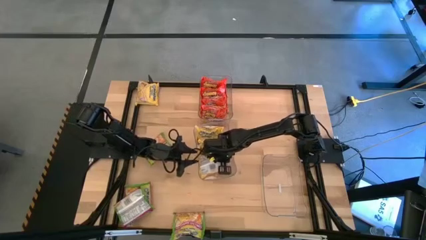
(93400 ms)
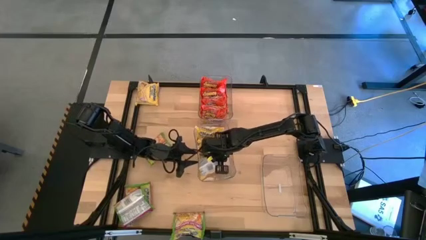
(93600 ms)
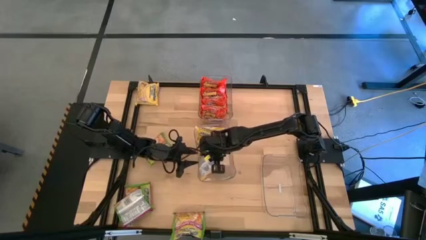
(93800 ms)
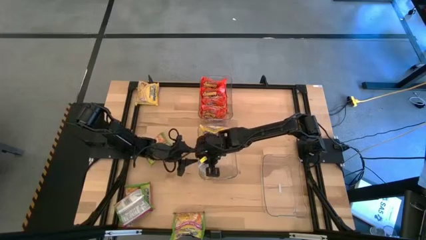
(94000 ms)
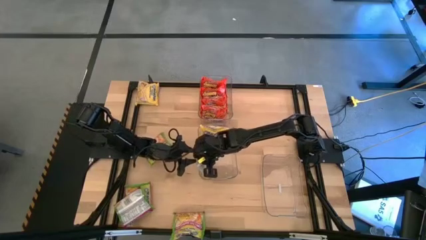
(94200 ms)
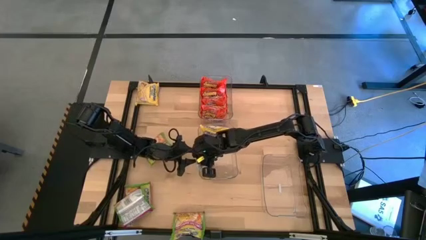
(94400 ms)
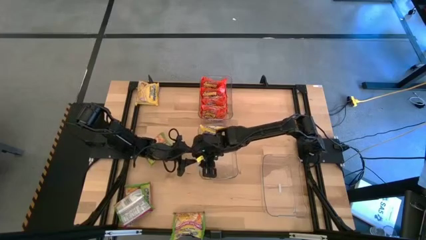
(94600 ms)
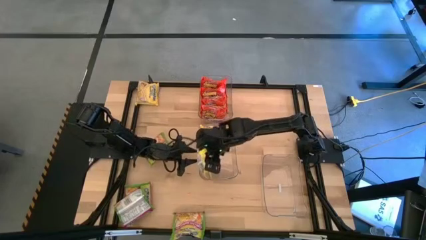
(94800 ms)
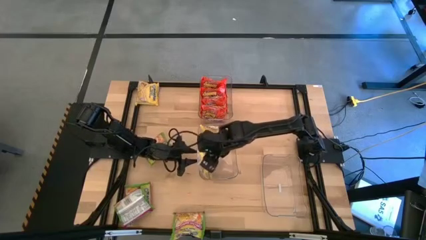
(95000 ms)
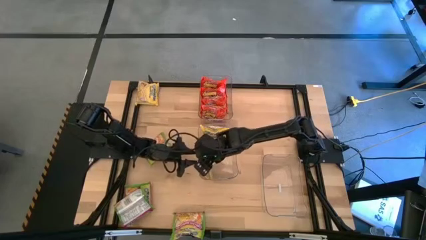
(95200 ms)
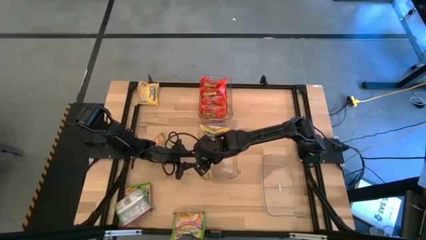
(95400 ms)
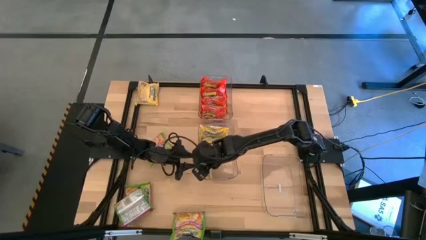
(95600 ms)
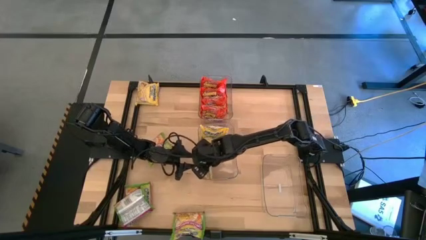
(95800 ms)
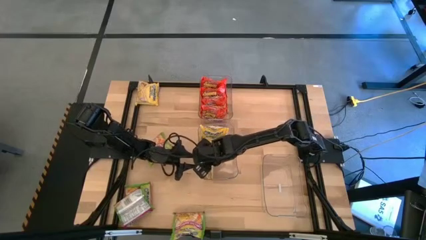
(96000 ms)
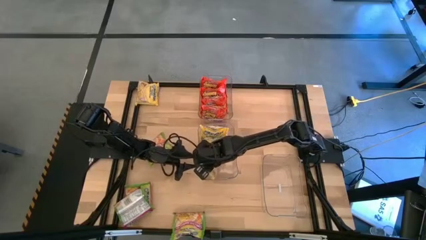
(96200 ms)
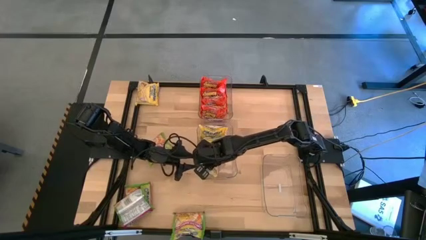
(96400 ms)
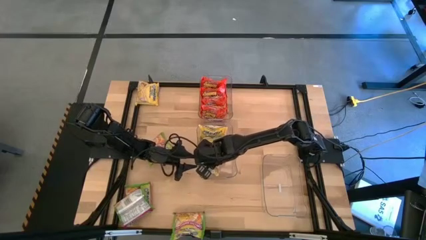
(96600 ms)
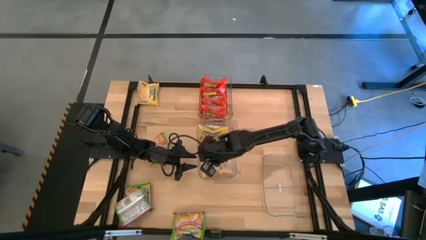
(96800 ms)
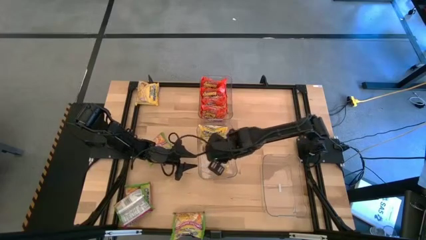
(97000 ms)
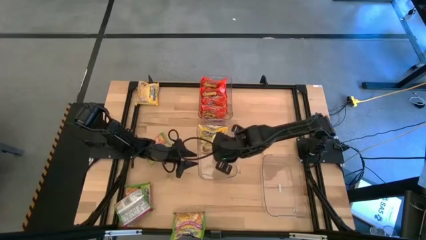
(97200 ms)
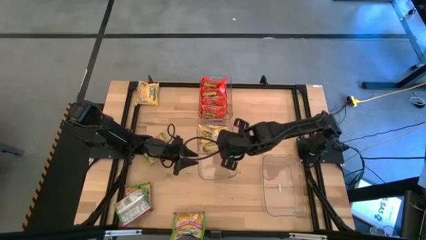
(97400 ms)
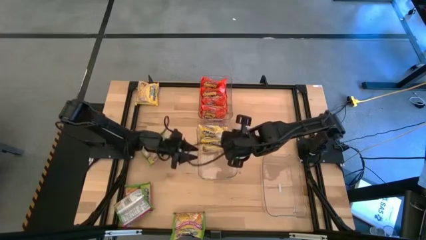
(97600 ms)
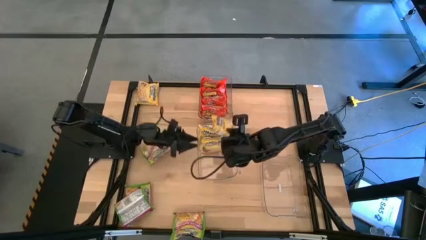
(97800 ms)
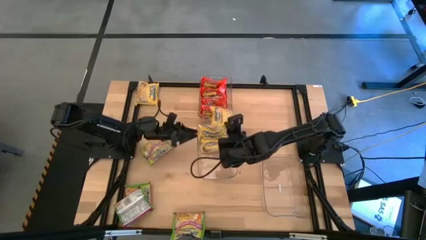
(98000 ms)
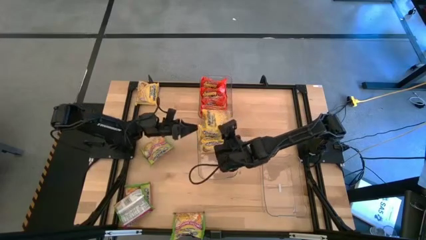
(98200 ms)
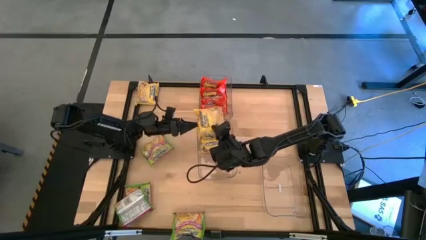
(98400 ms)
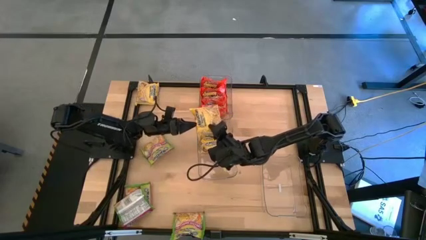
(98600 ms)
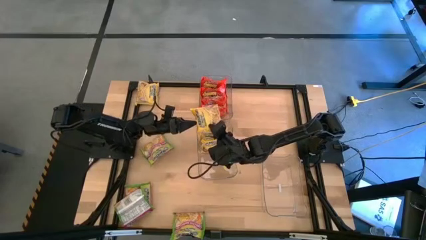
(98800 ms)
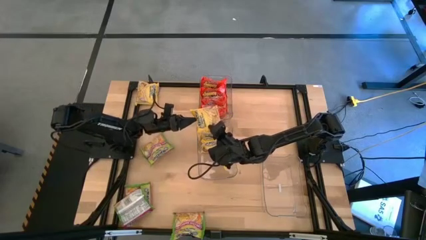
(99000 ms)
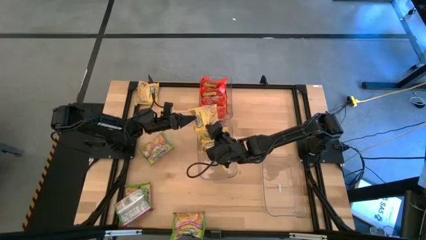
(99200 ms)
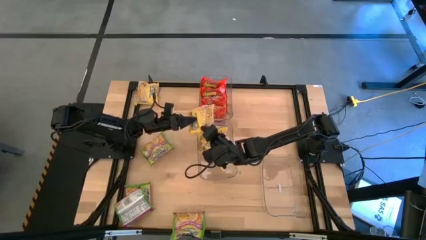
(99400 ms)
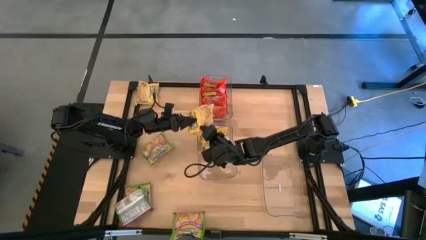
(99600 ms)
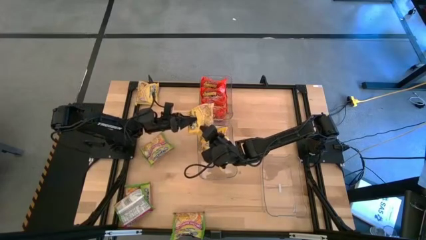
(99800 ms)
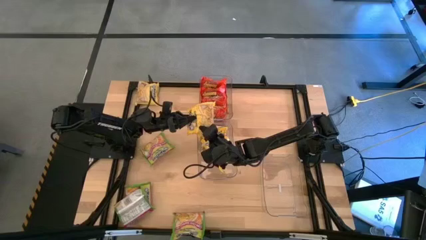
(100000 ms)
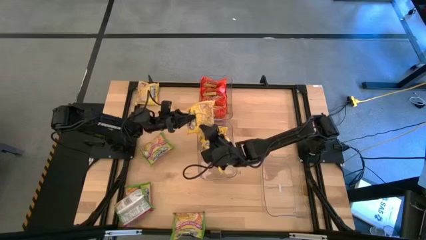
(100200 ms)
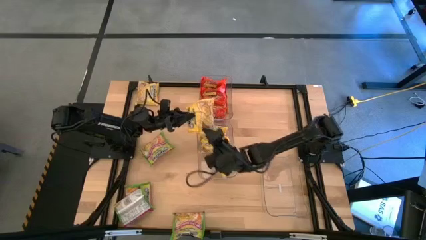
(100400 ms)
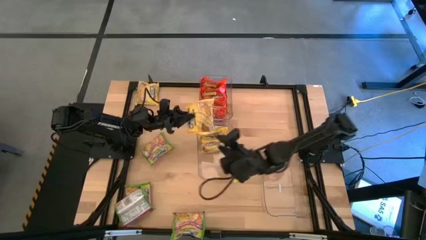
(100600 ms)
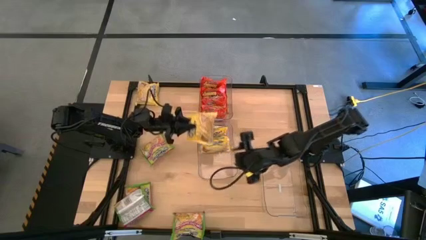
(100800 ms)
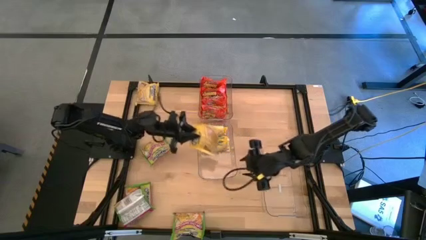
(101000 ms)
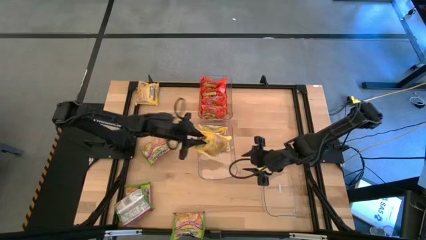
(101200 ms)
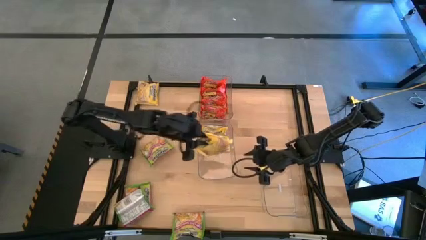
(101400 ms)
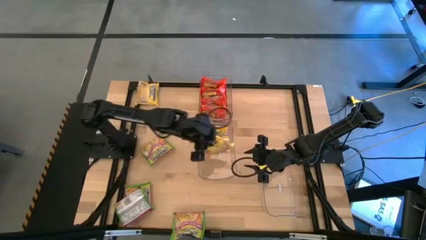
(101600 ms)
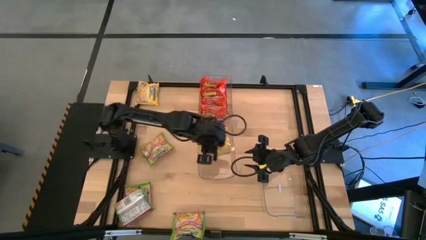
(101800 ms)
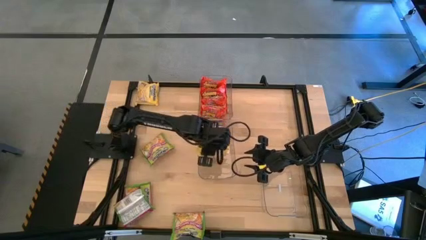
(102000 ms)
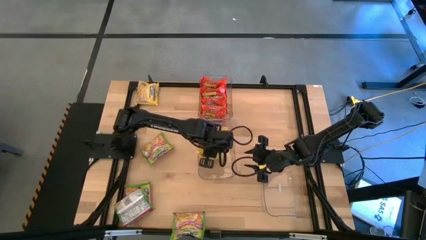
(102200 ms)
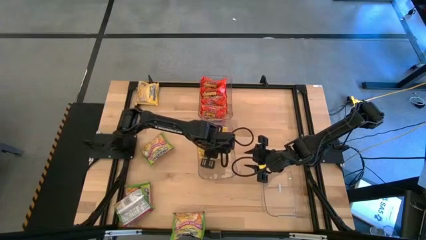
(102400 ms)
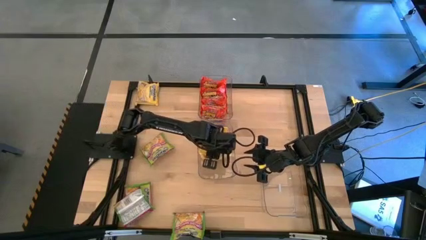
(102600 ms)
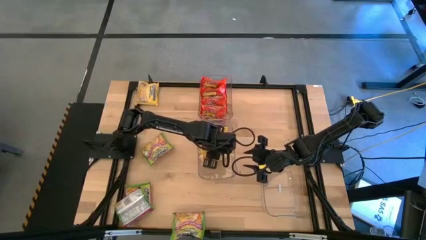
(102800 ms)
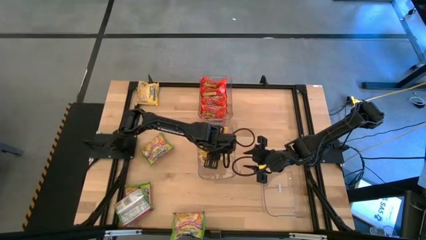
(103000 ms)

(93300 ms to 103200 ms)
Task: Sort Maruchan noodles
Put the yellow noodle pack into the middle transparent bin
